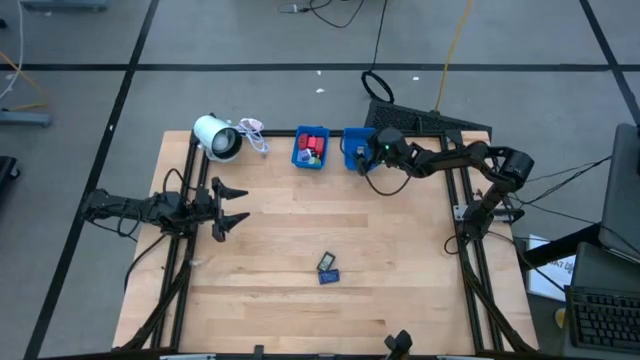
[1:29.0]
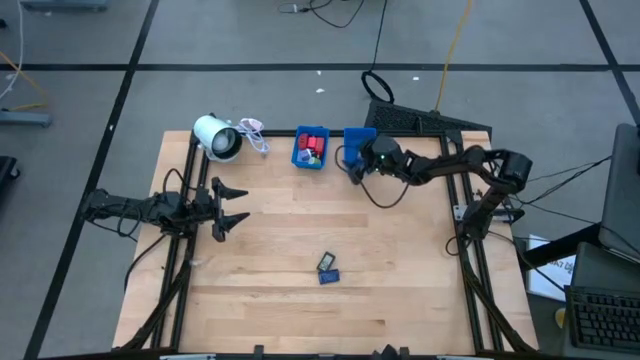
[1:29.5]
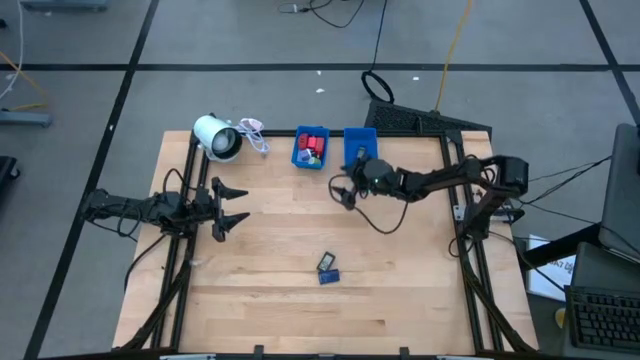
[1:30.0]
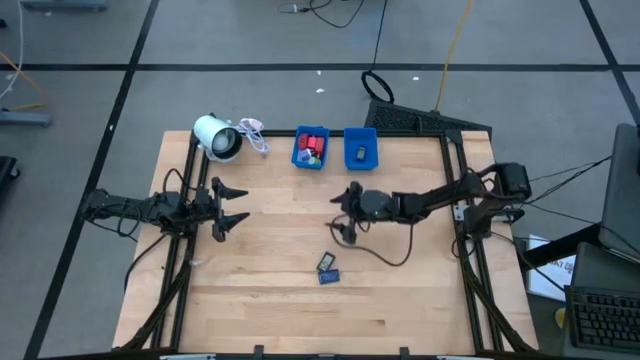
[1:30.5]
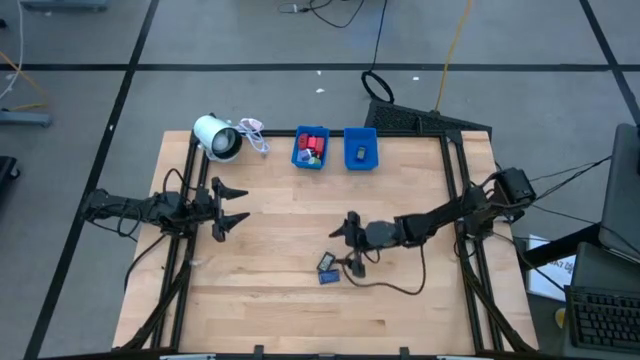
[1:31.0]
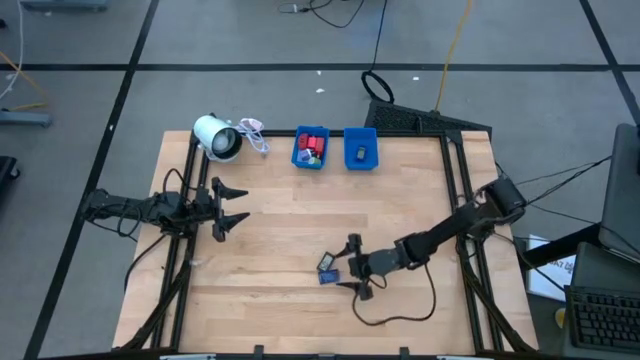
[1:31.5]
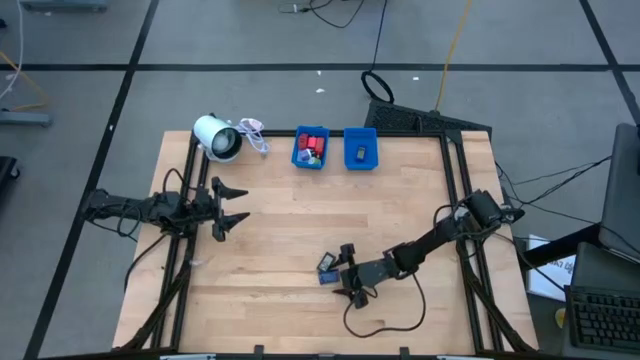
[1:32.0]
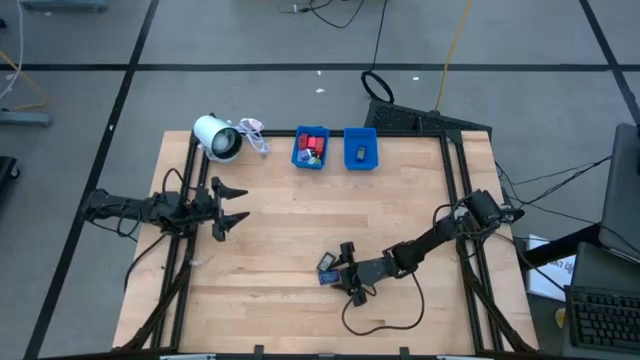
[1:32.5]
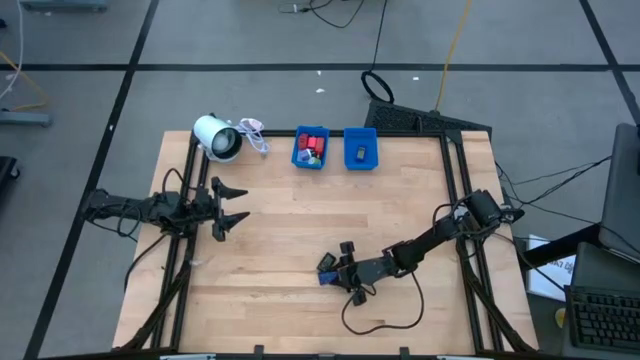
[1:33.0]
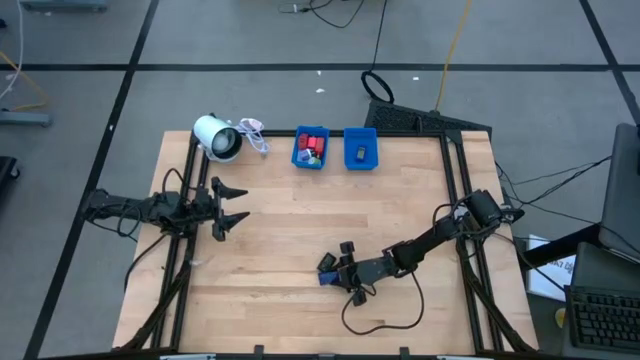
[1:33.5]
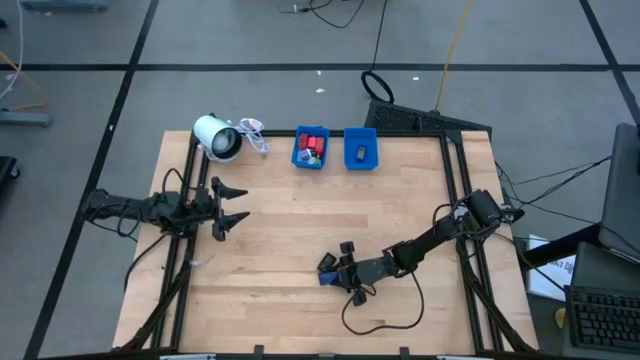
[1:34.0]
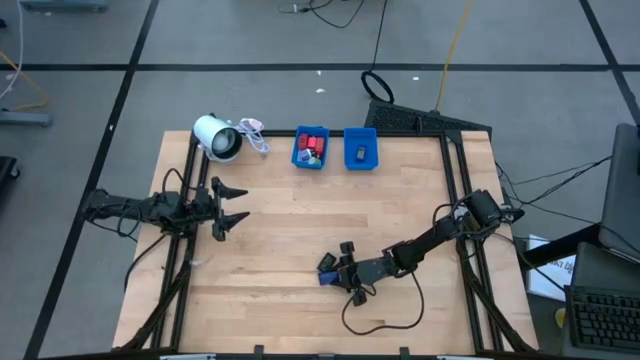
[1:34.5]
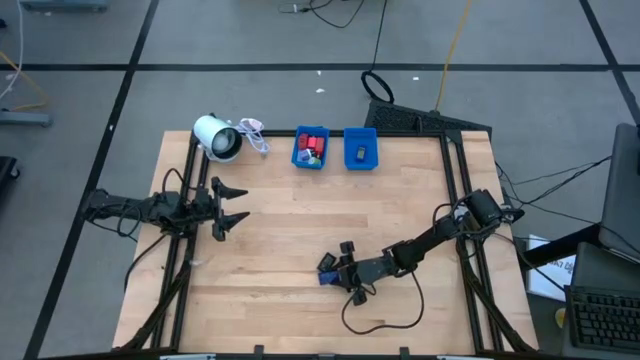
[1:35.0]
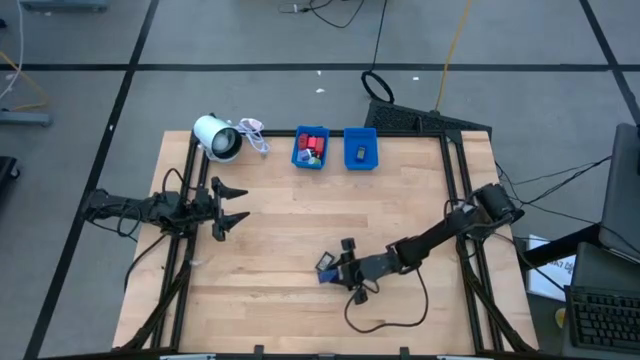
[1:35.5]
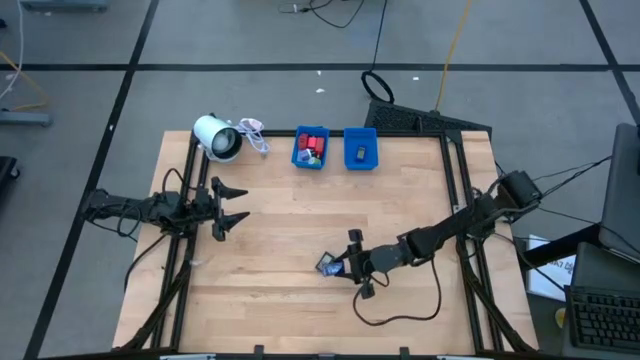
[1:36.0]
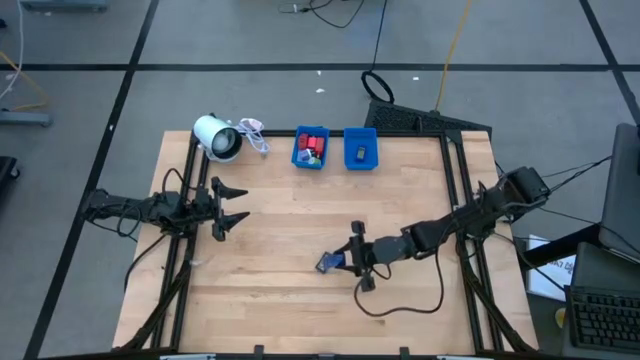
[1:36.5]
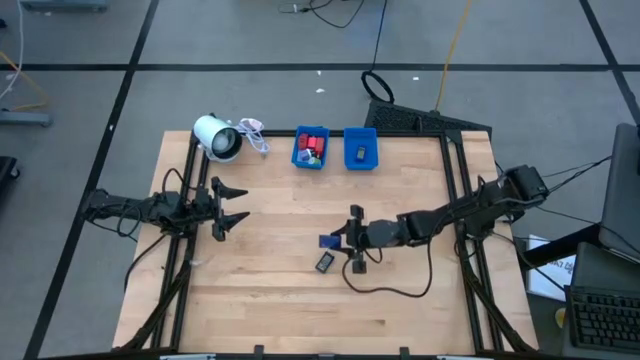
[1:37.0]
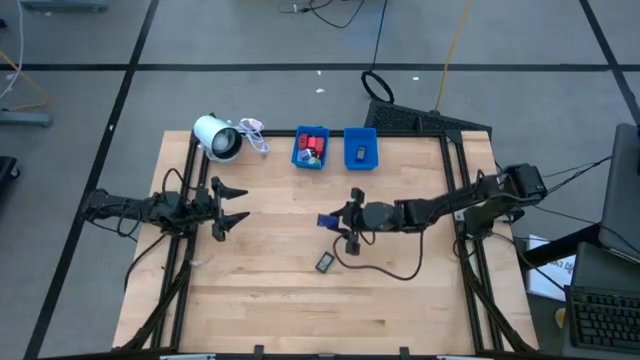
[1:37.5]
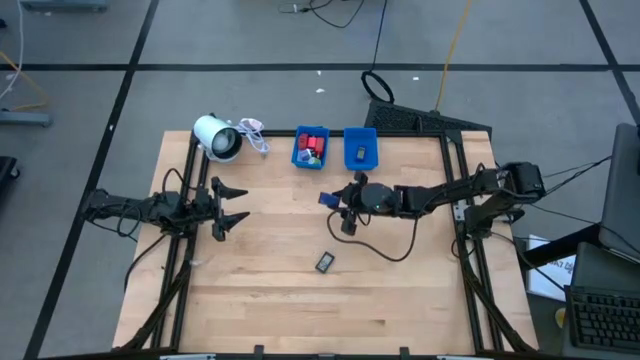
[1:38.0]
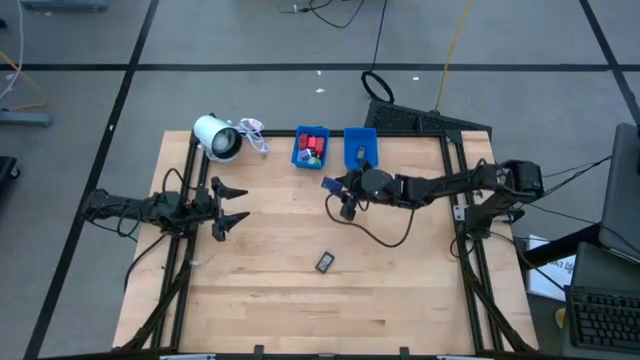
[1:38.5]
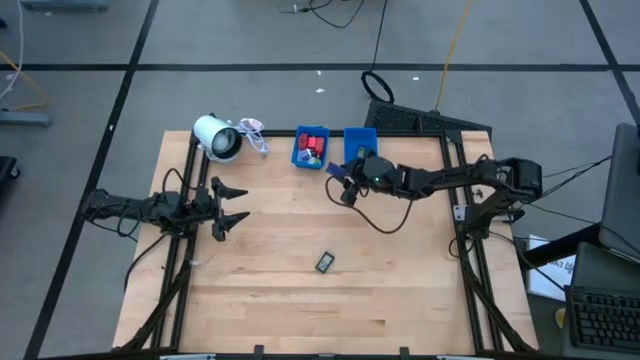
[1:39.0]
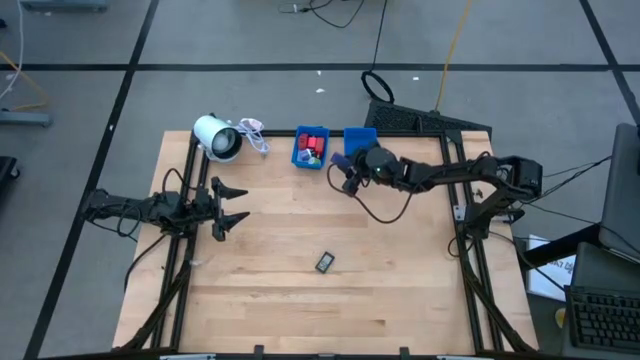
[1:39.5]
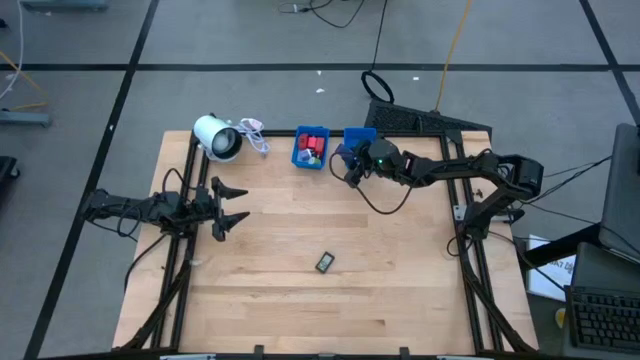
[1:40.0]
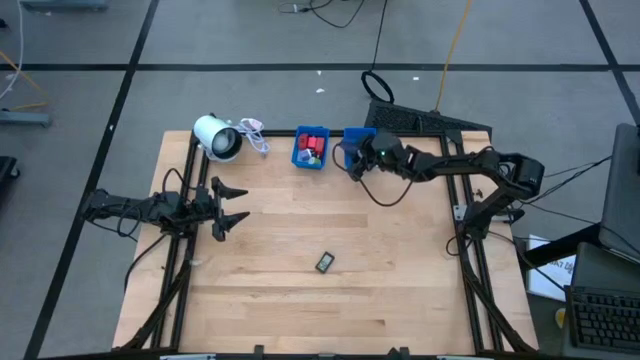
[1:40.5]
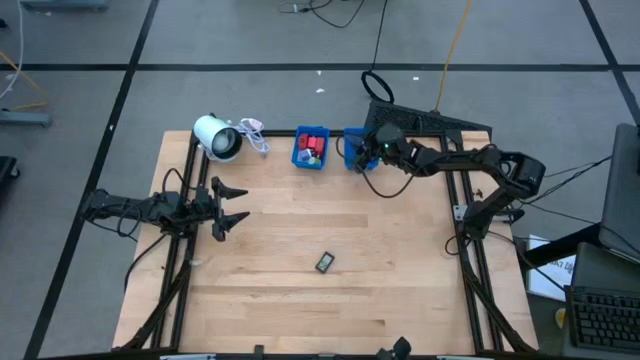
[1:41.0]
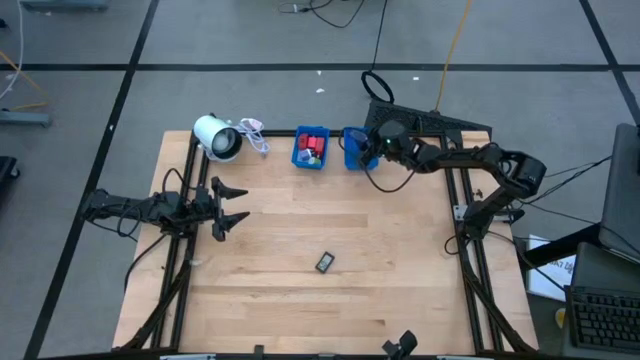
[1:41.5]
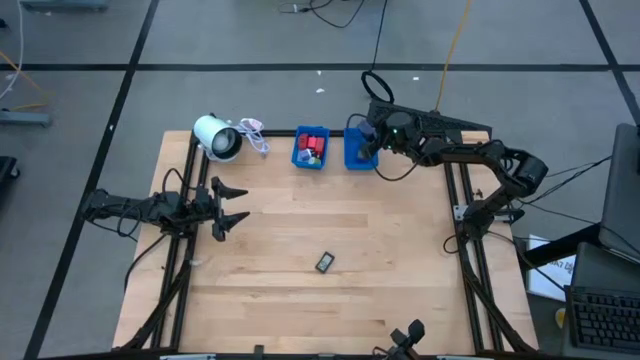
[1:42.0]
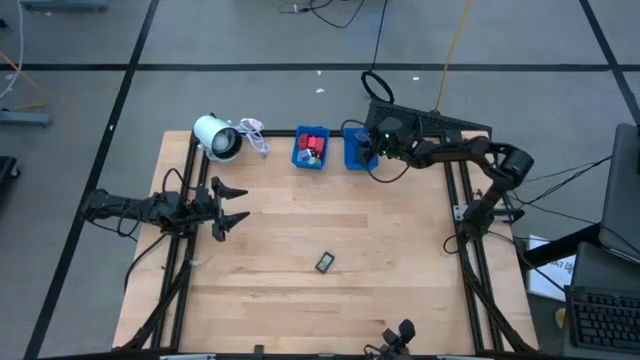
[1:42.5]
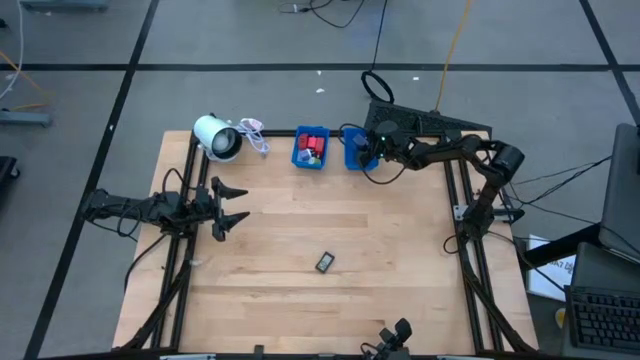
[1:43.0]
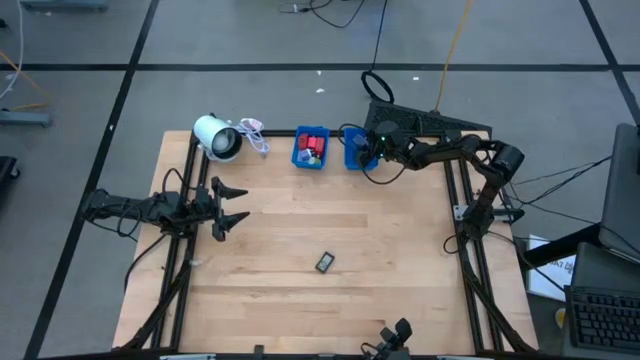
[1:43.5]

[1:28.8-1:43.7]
Task: Pick & Place Office items
Put the blue digital clock into the right basket

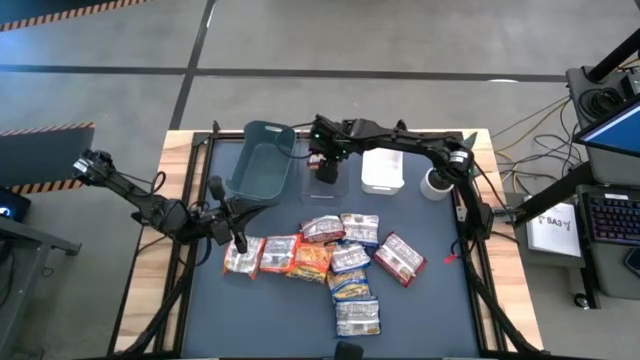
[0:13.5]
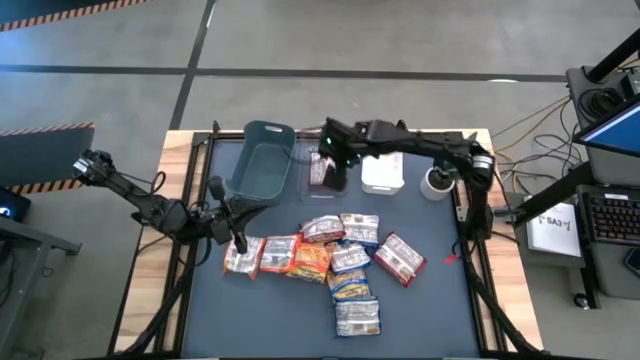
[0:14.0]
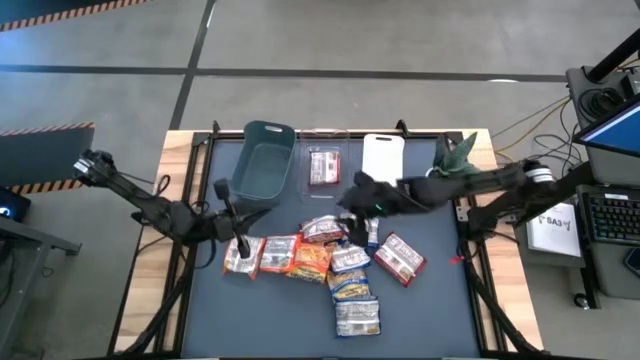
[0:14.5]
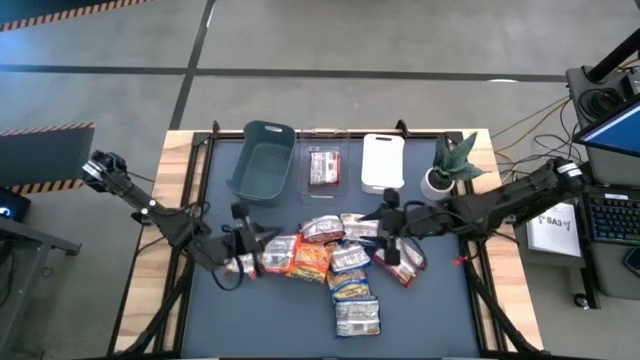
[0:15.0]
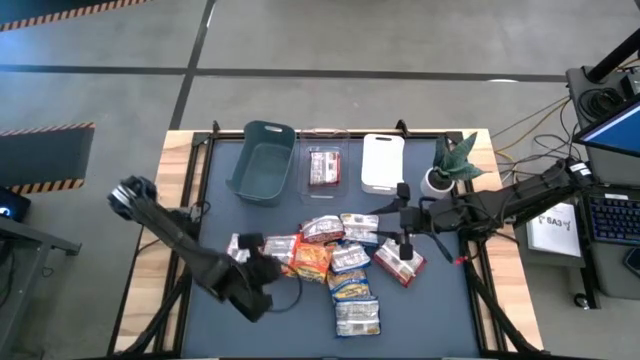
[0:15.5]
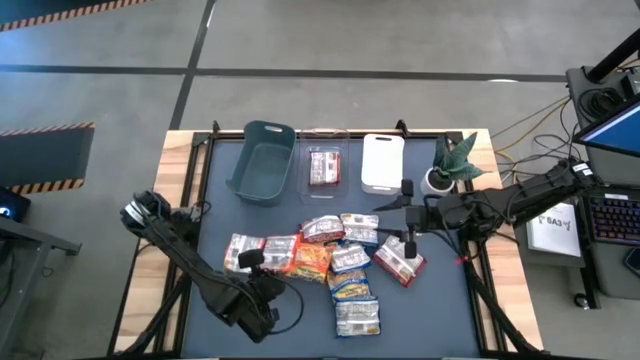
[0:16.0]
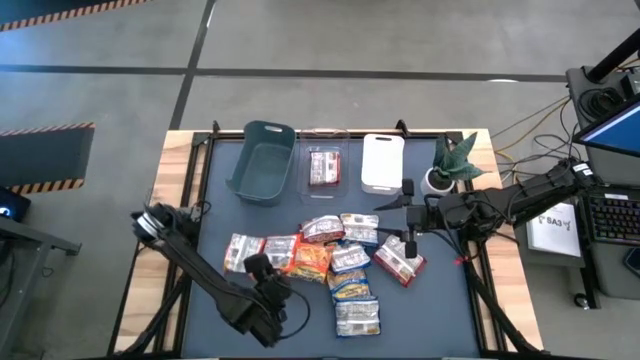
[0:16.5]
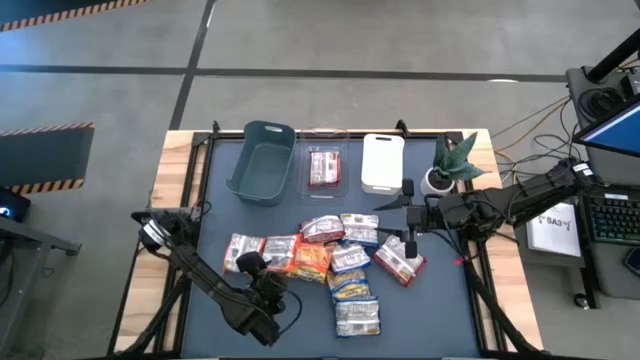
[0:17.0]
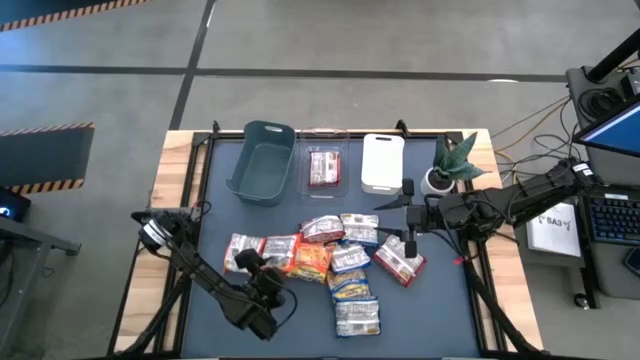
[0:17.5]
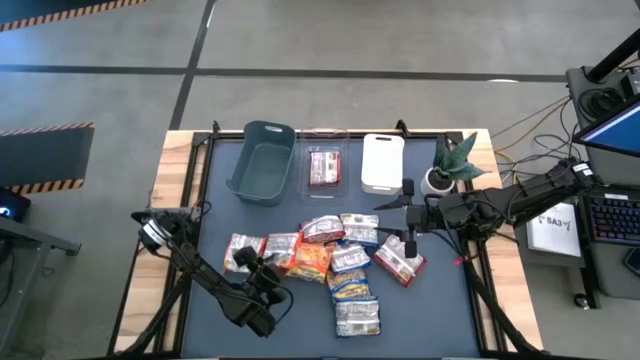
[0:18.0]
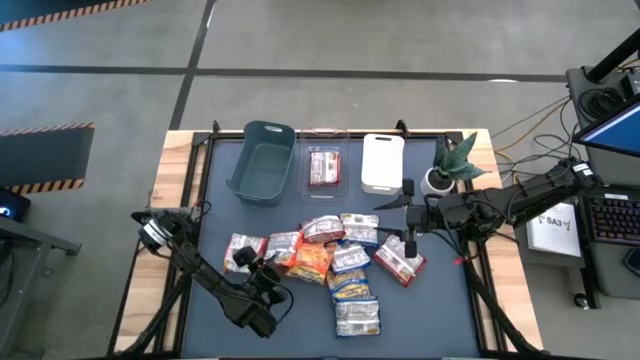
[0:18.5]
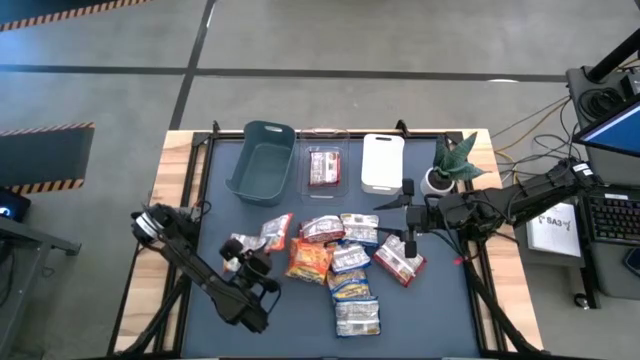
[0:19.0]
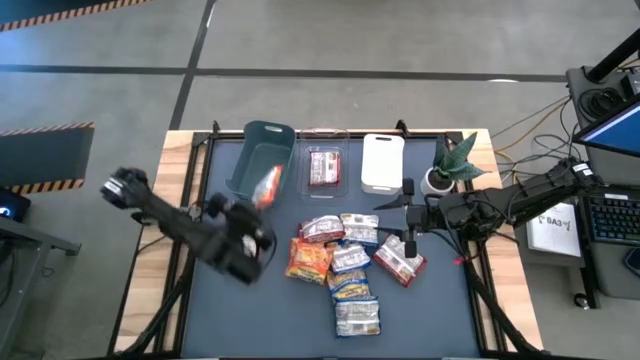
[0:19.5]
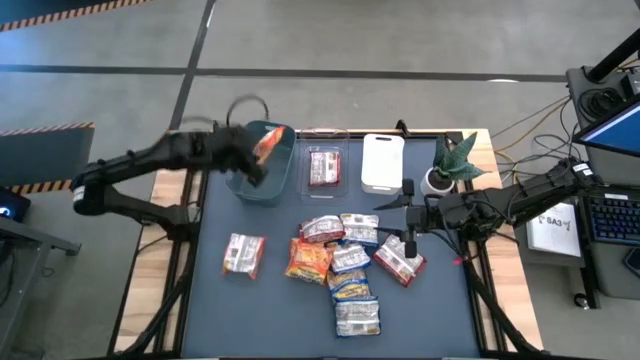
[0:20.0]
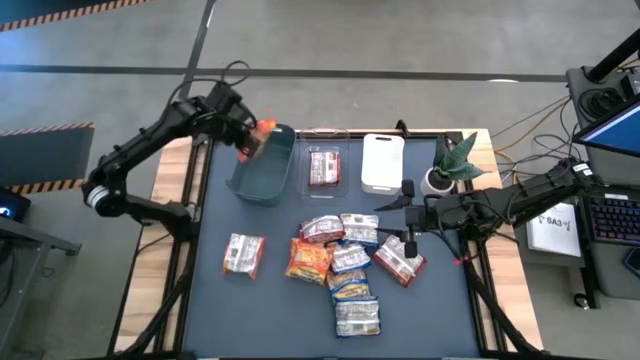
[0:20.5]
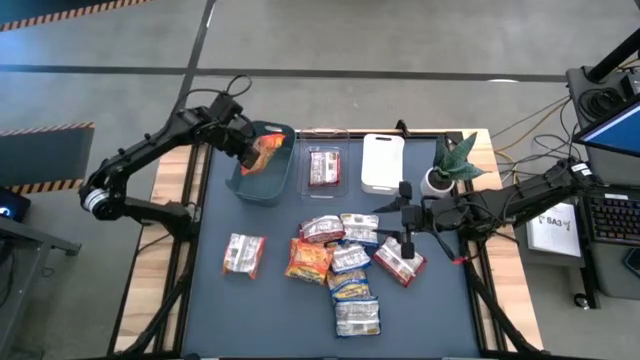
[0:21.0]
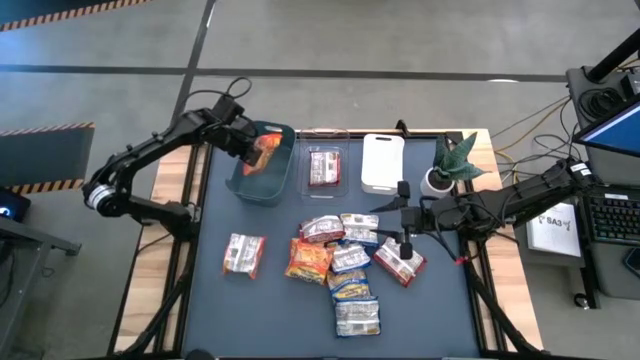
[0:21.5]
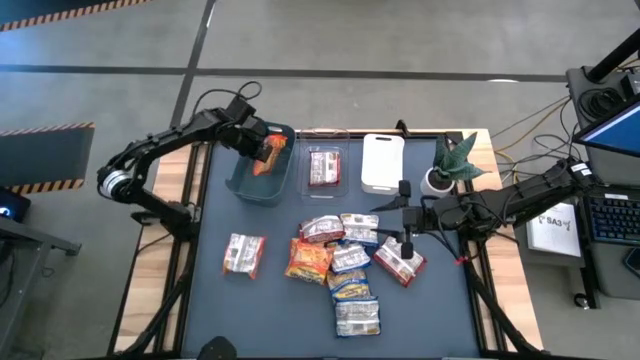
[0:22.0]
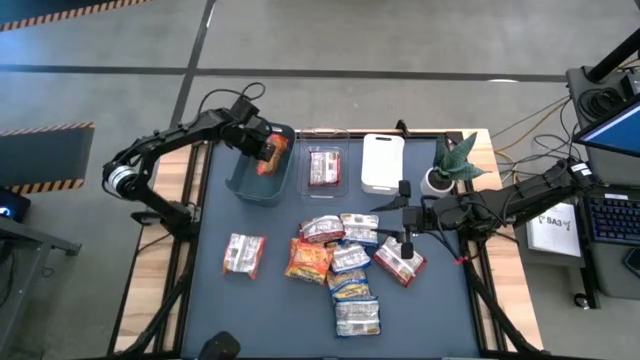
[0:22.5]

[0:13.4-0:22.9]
Task: Sort Maruchan noodles
Put the orange noodle pack into the dark green bin
